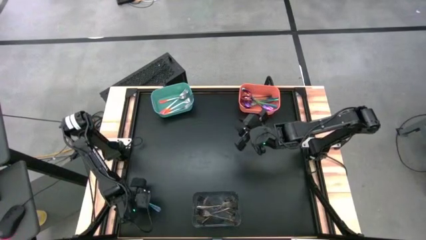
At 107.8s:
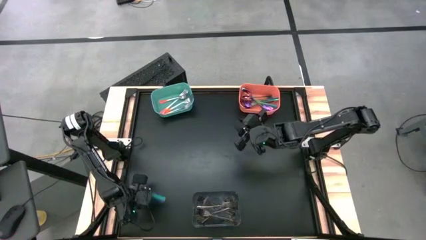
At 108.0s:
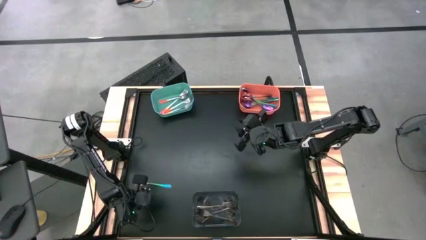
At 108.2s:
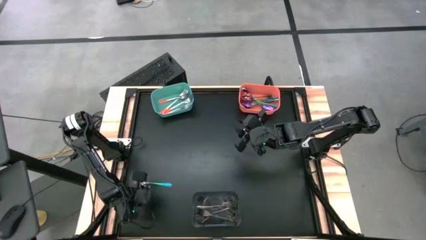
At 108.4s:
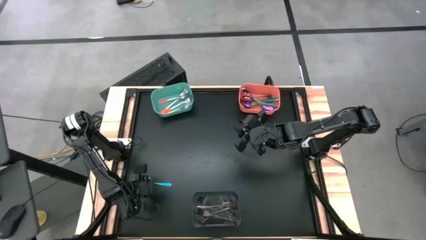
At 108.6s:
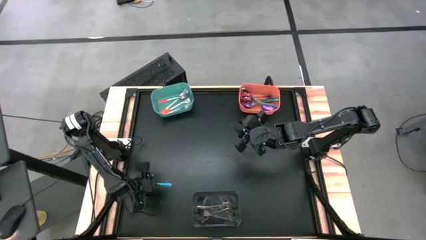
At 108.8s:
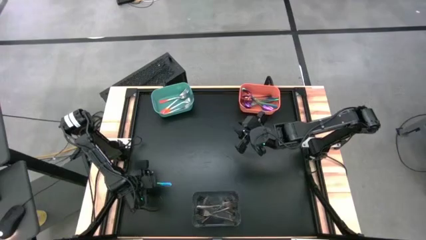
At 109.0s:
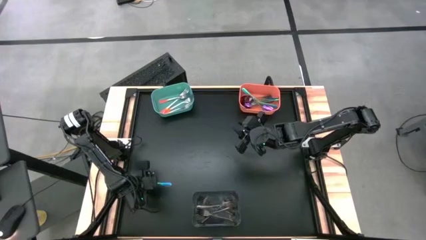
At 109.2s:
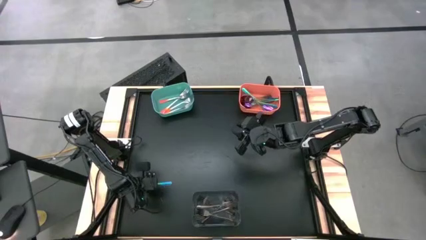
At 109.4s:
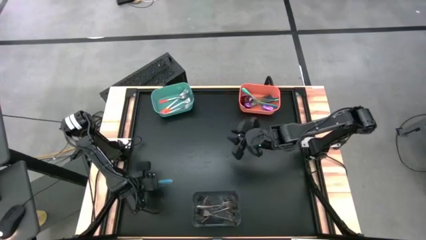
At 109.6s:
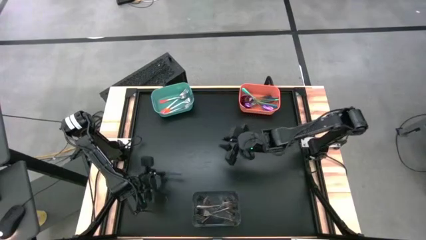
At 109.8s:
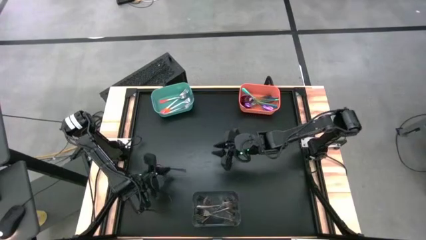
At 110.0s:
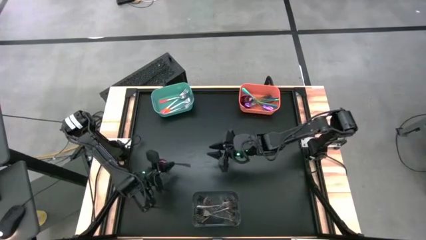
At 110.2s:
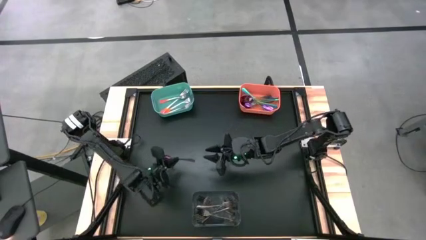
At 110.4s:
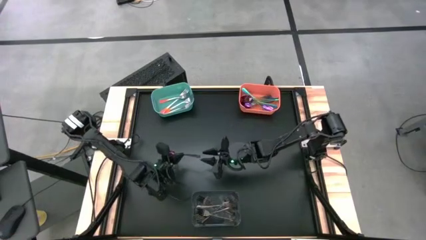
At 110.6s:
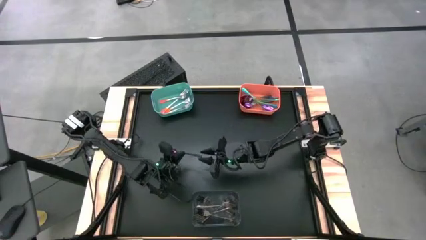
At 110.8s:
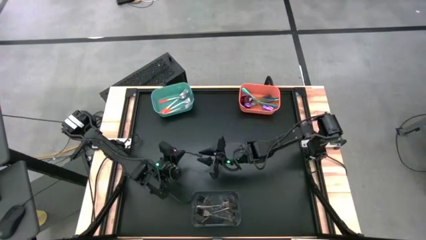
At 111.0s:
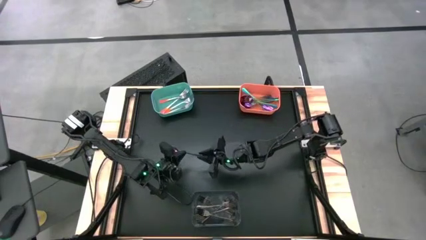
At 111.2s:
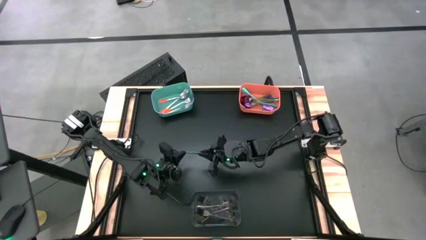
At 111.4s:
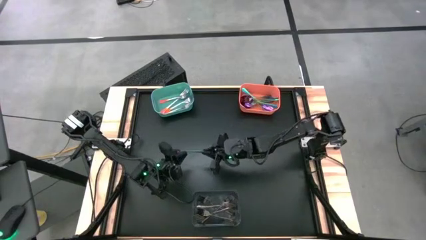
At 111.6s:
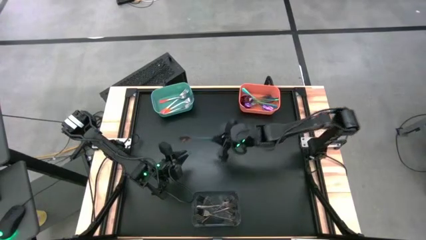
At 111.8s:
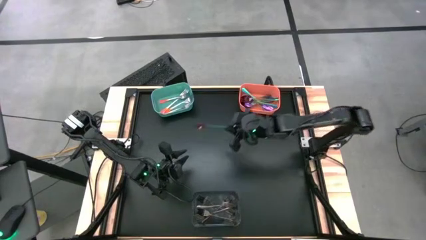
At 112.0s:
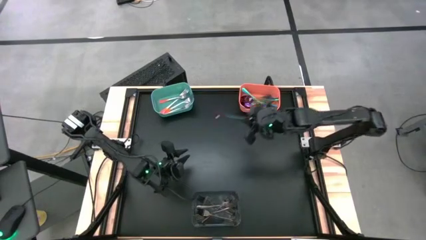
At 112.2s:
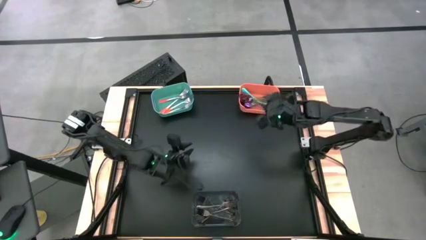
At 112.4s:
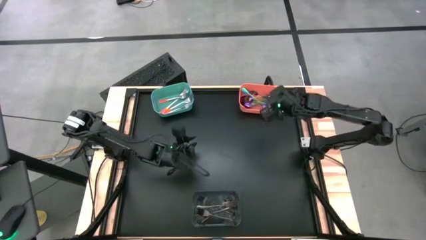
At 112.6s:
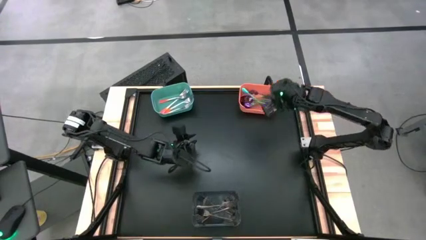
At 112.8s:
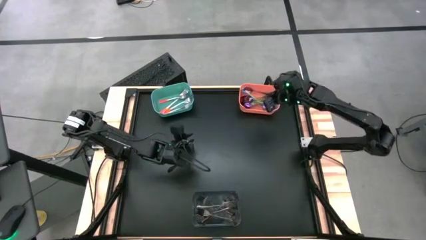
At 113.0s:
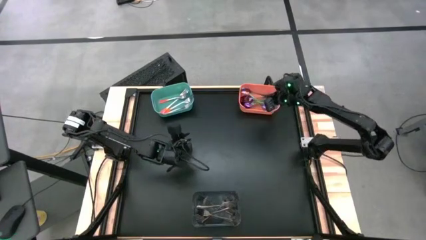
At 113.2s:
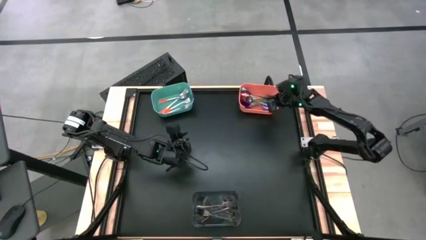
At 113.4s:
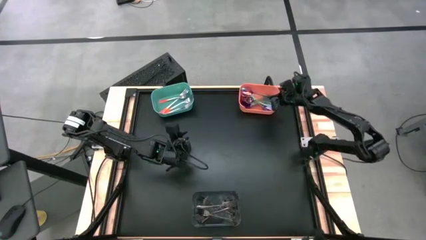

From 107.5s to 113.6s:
Task: Sort silverware by color (type)
Put the blue spoon into the orange bin

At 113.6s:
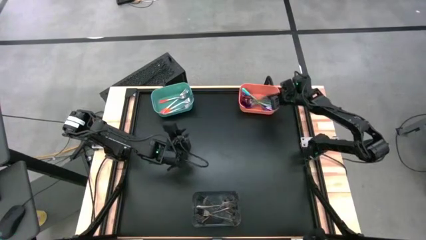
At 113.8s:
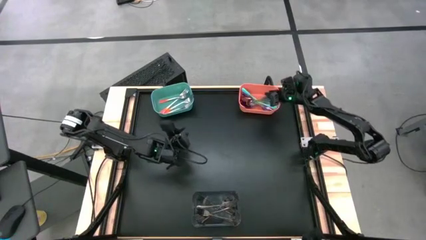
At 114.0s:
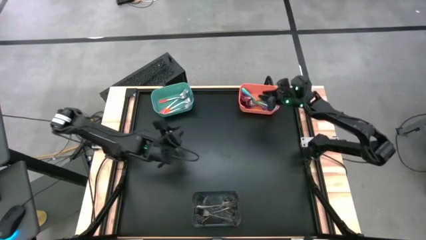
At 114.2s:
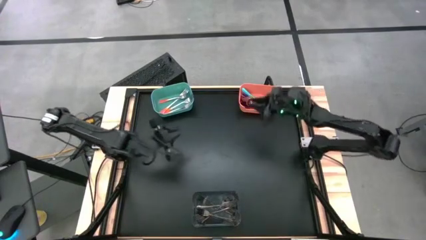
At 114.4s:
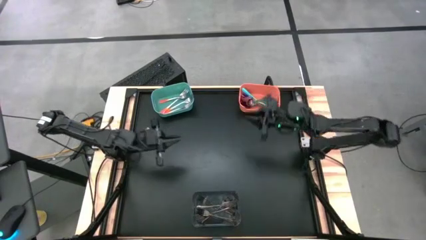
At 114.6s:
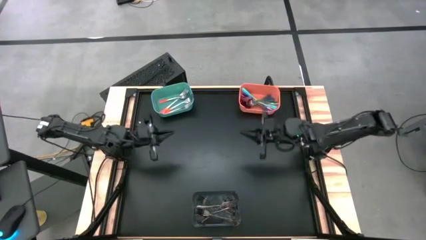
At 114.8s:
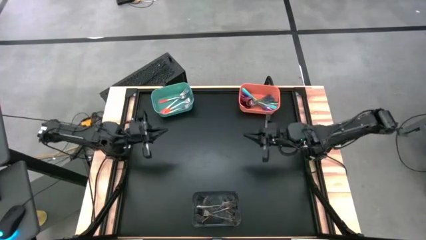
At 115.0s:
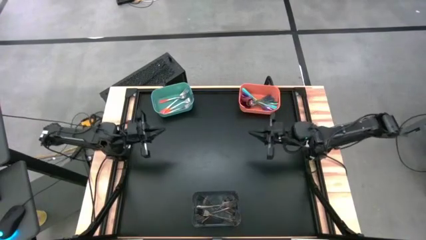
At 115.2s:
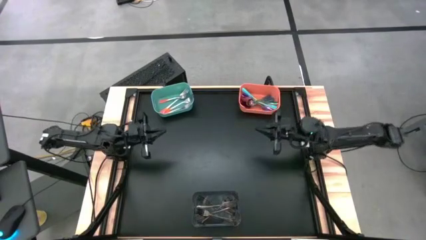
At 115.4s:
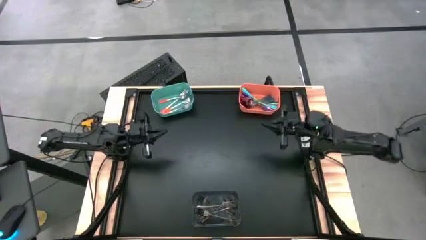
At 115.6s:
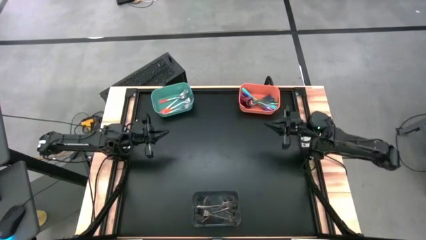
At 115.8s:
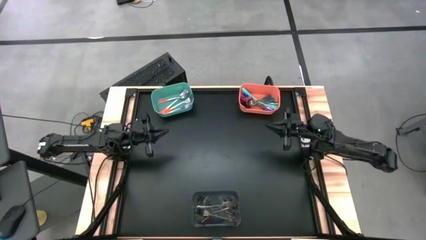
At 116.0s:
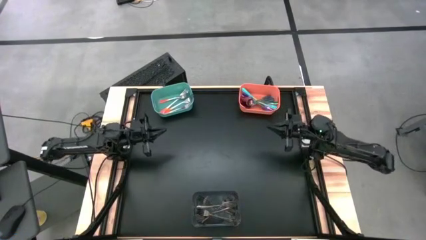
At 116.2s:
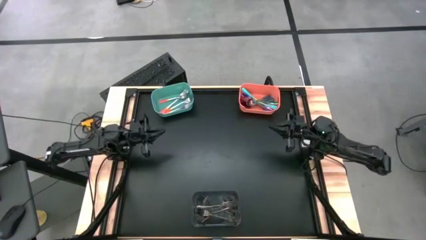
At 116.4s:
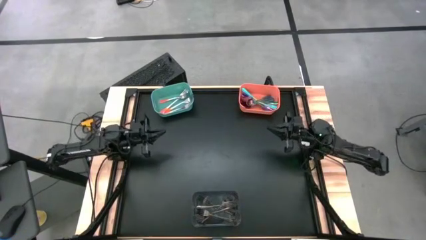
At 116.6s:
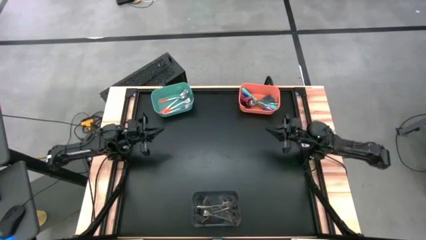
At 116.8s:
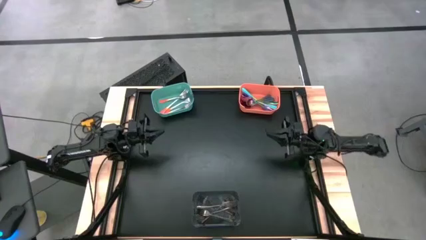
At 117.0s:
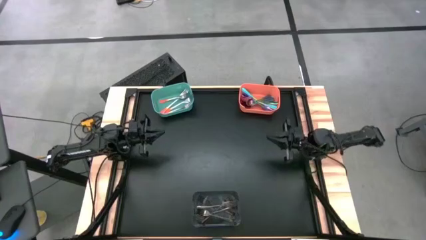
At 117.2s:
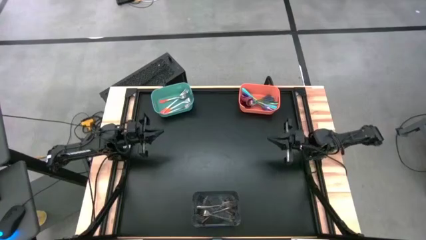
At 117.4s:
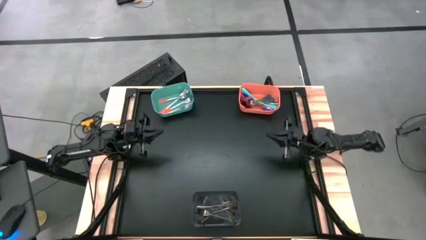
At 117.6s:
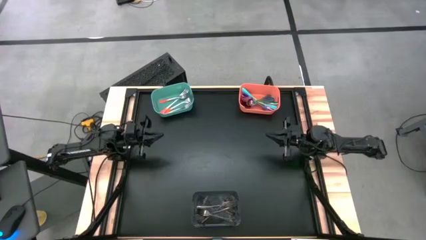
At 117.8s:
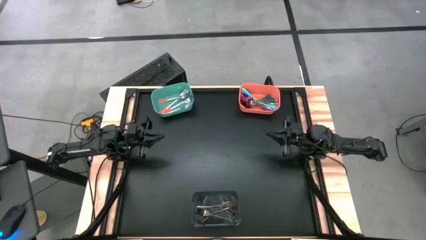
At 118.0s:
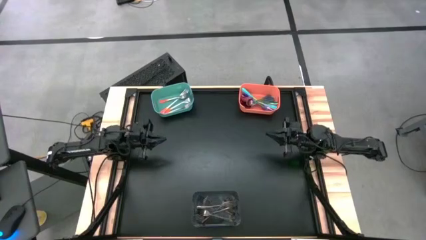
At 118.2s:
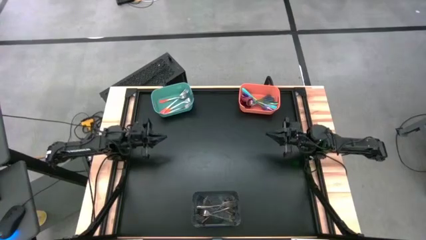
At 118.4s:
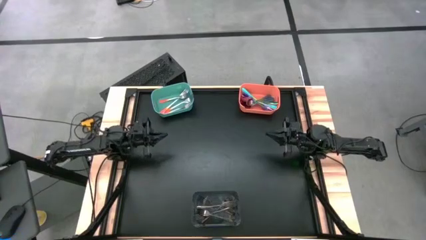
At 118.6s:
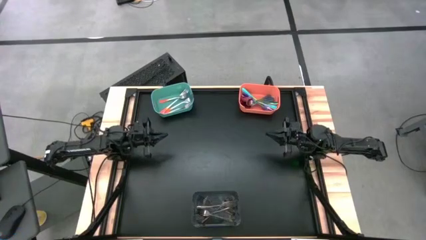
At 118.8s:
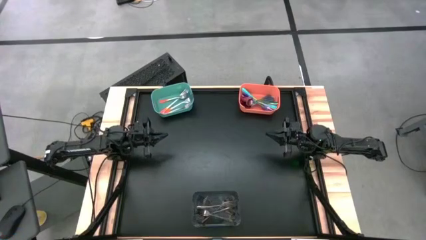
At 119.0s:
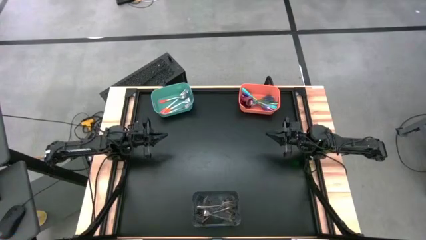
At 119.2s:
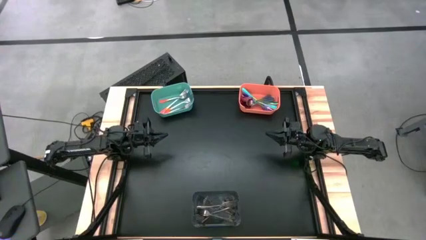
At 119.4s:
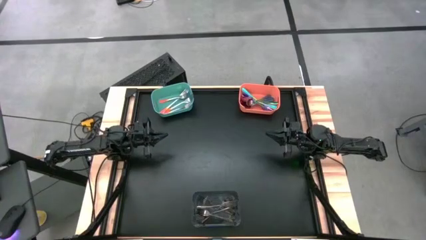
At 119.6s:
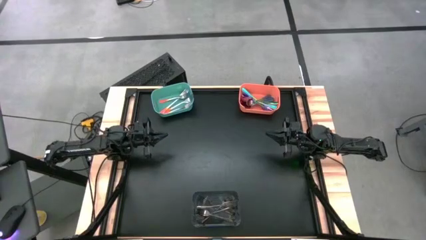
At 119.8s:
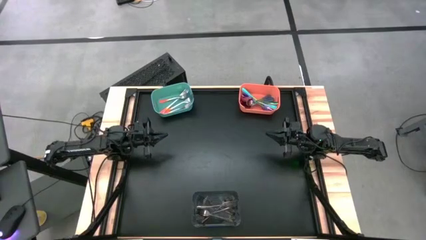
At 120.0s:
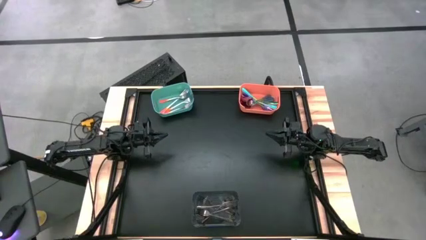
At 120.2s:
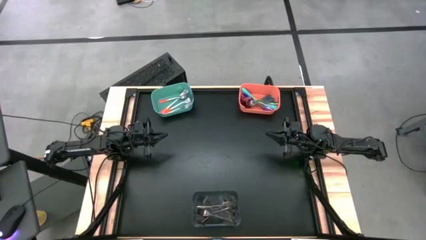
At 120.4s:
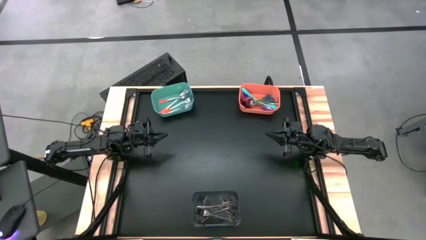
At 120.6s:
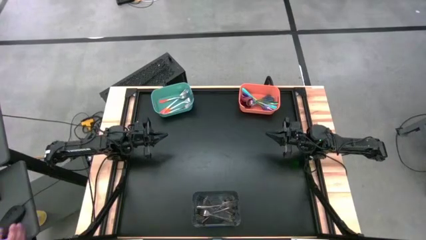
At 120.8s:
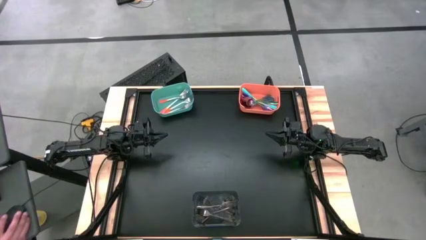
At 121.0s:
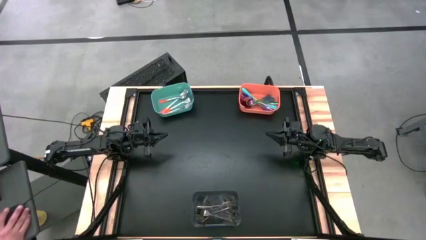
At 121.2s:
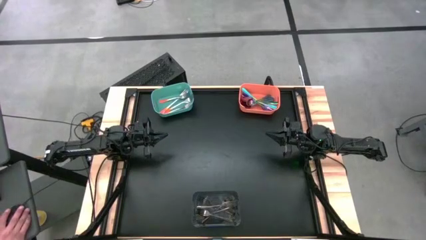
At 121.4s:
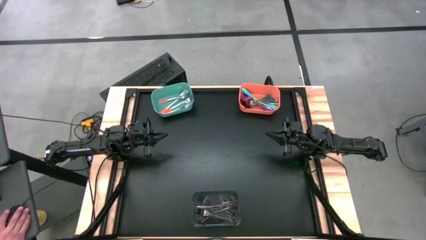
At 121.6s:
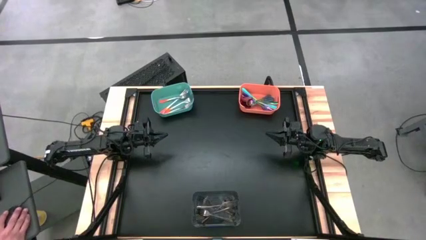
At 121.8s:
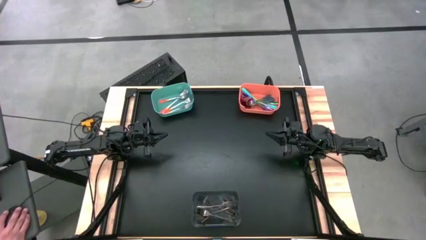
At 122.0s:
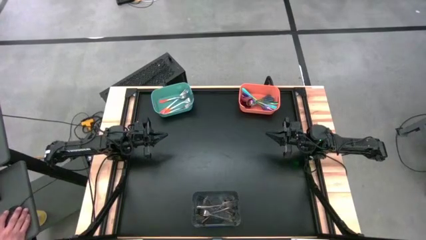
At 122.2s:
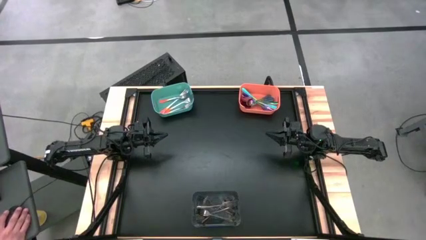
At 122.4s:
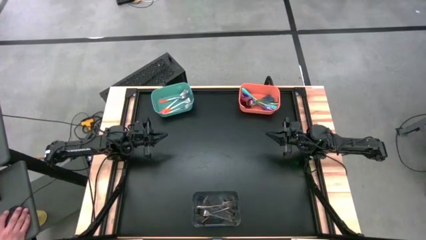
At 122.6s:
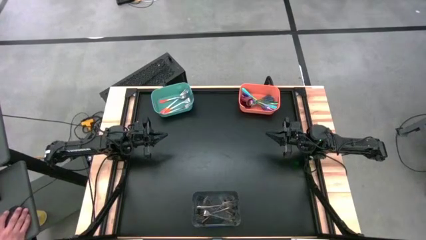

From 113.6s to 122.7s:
Return to Home Position
